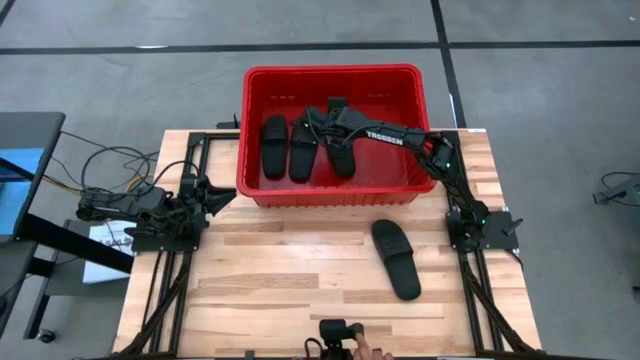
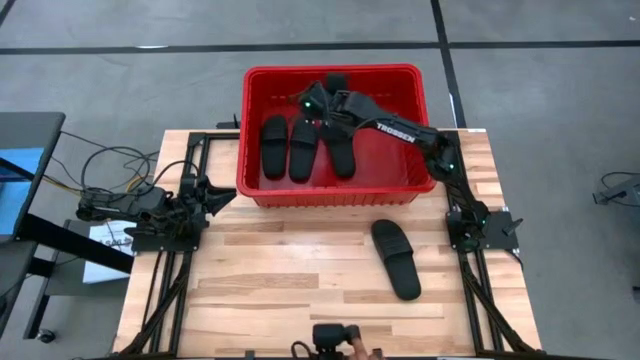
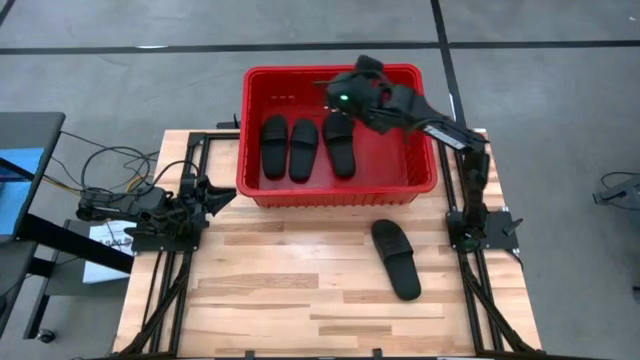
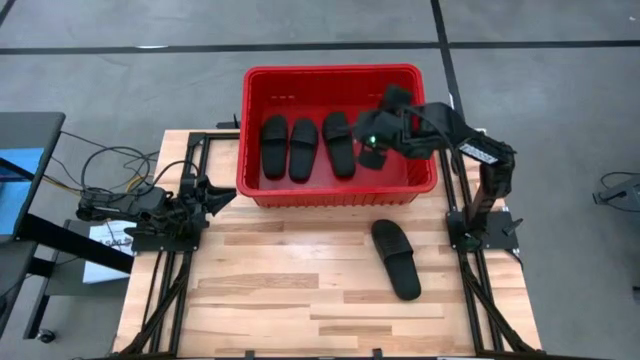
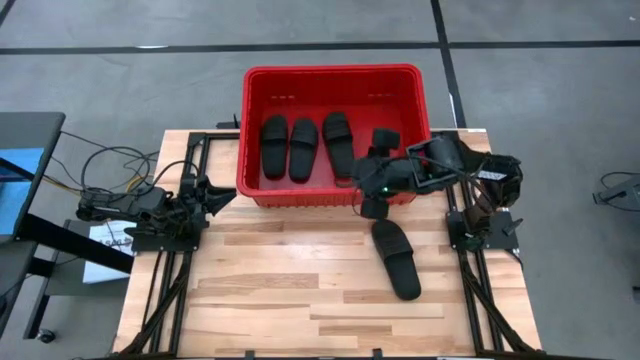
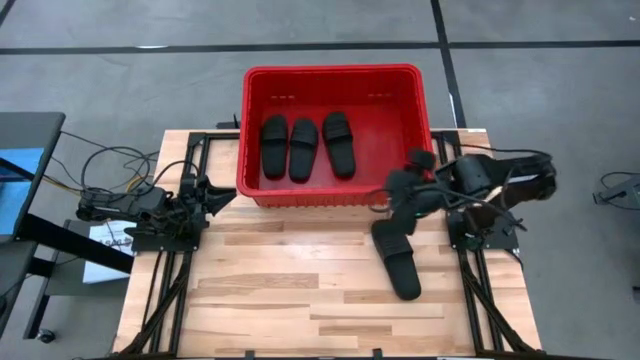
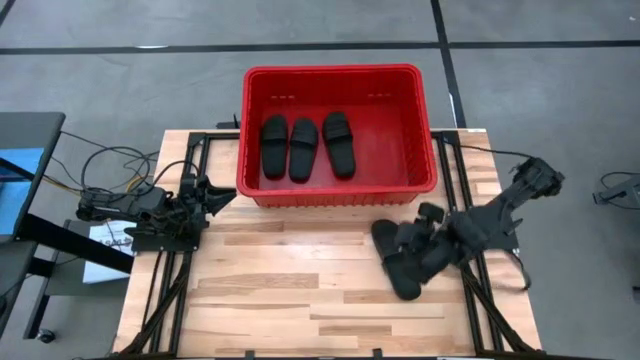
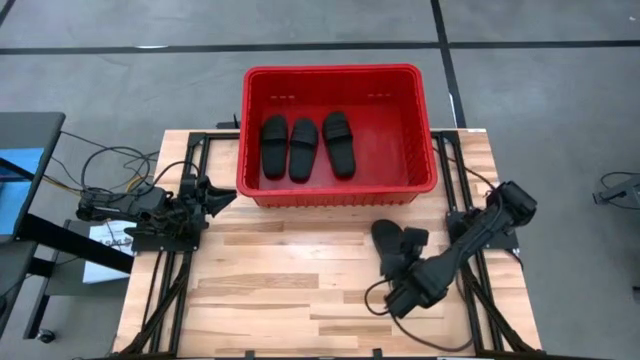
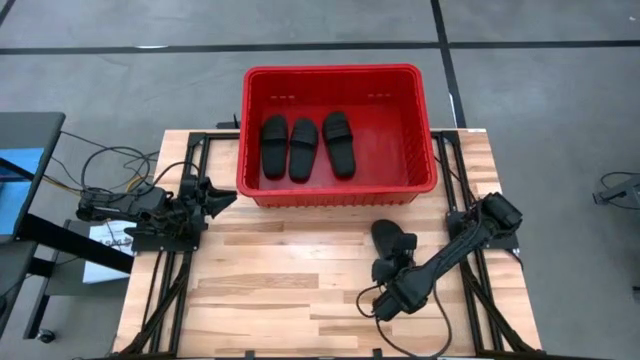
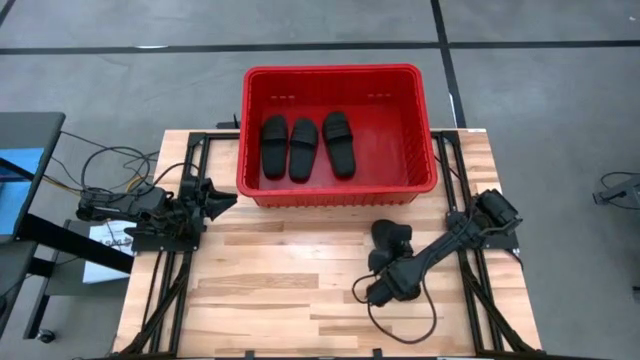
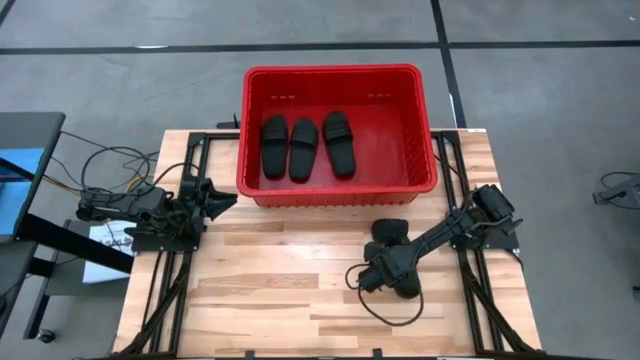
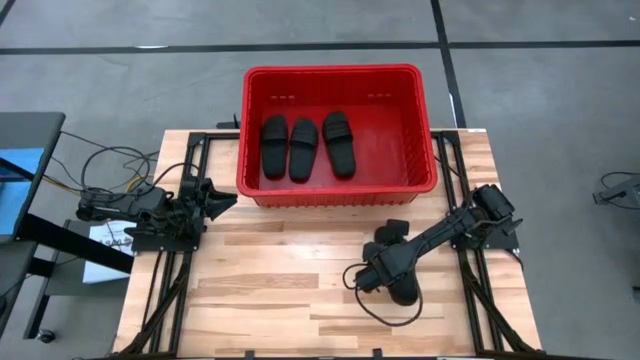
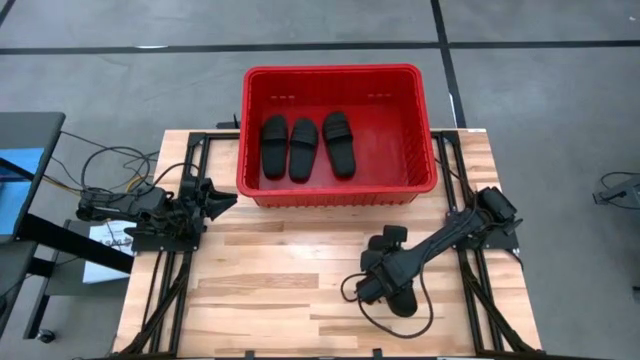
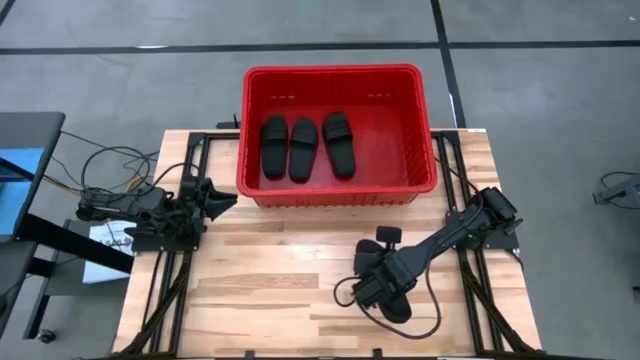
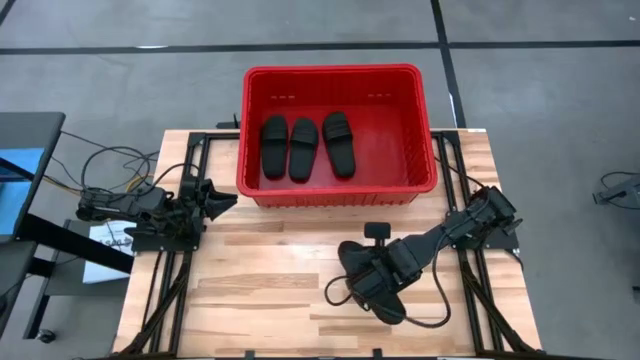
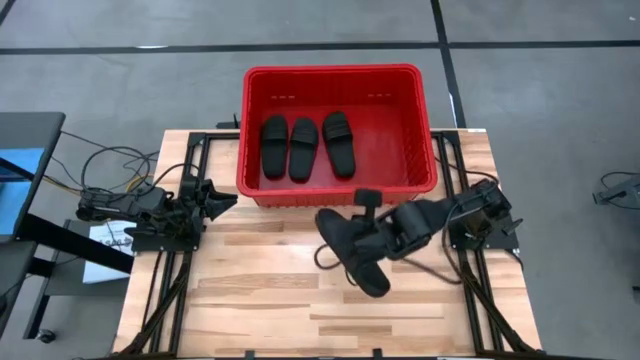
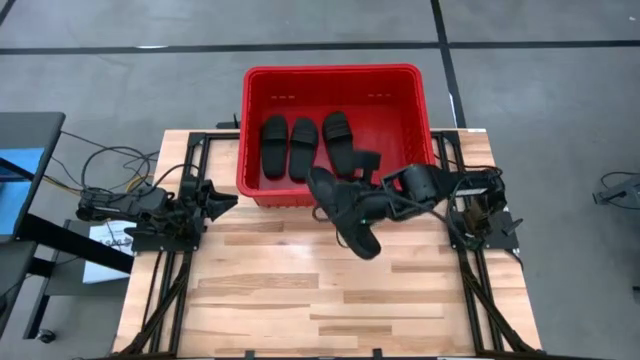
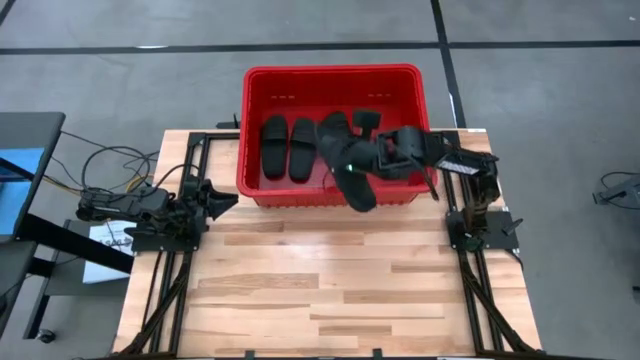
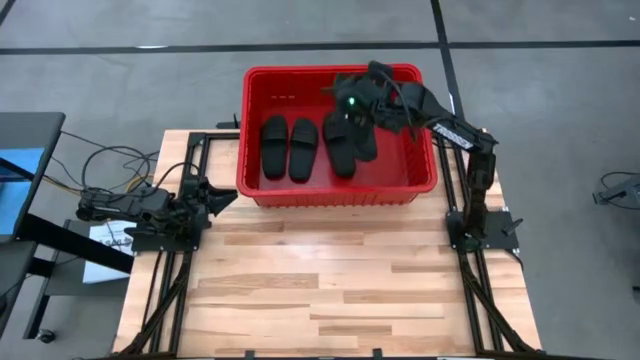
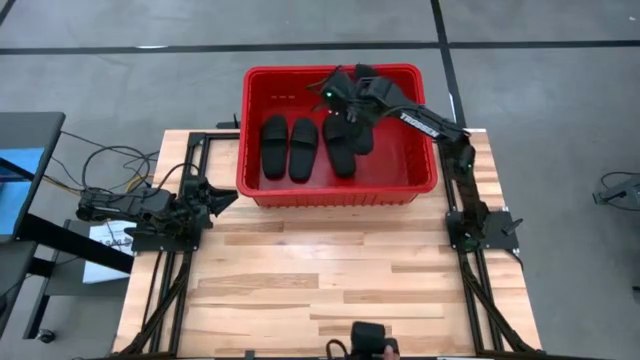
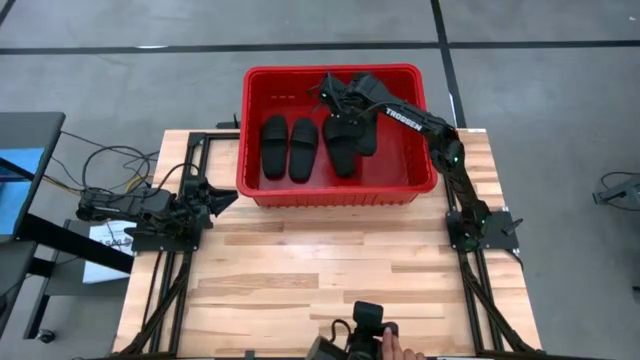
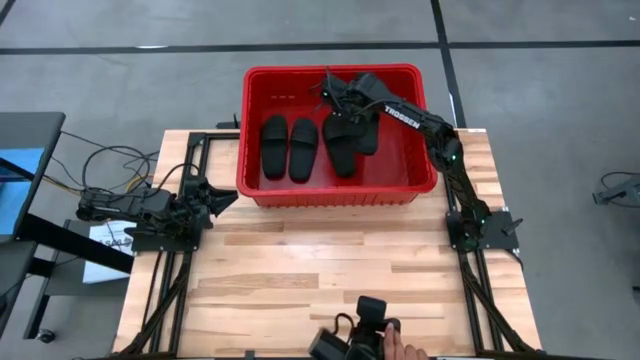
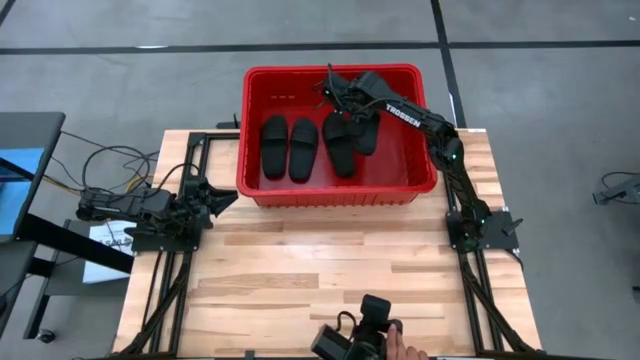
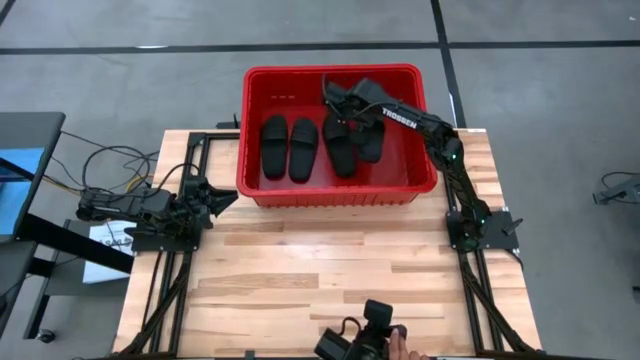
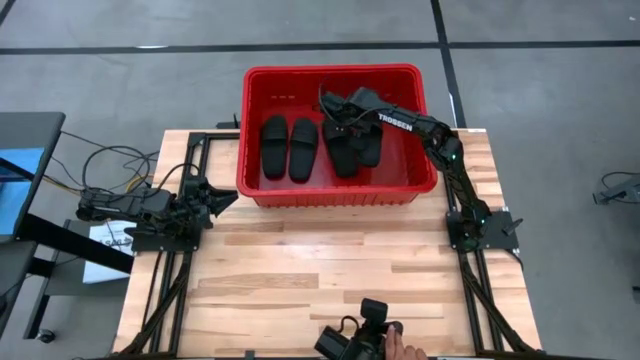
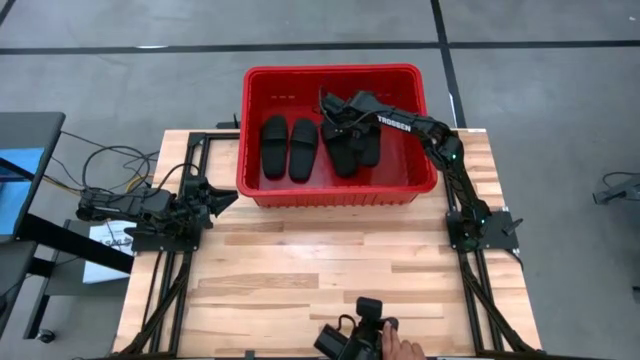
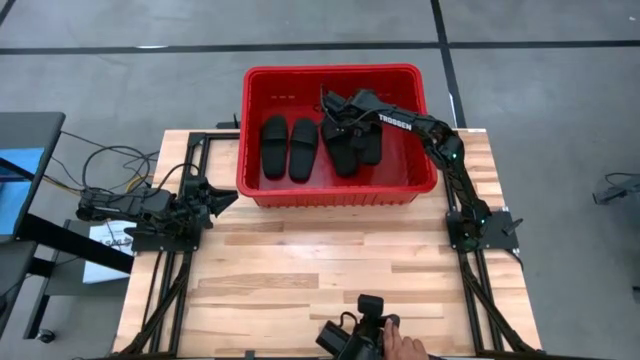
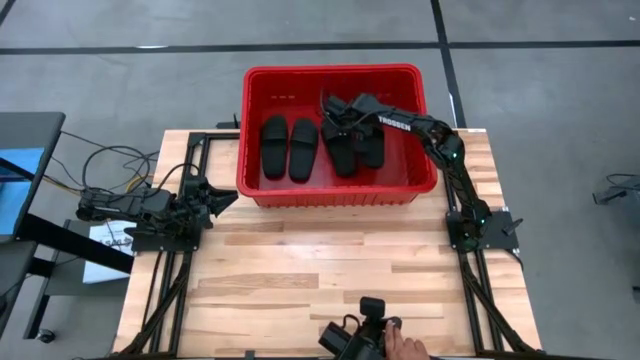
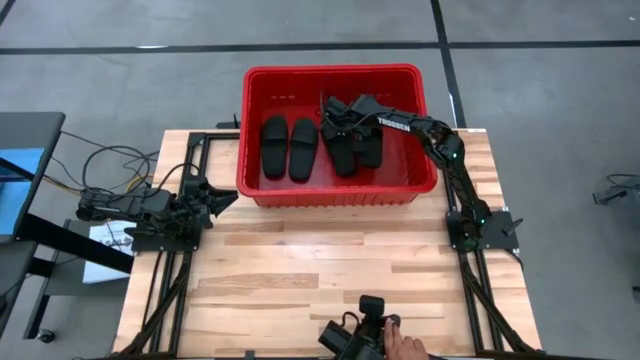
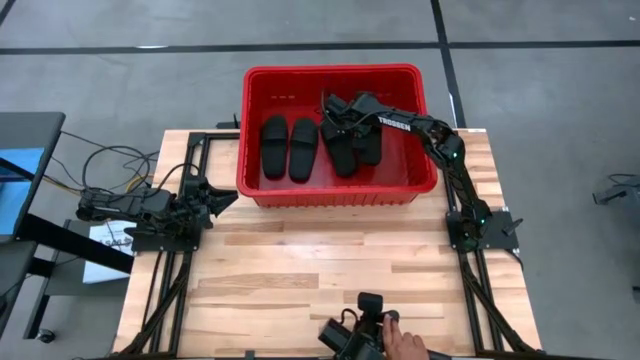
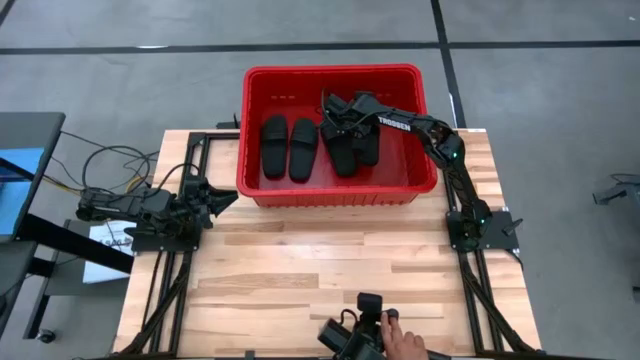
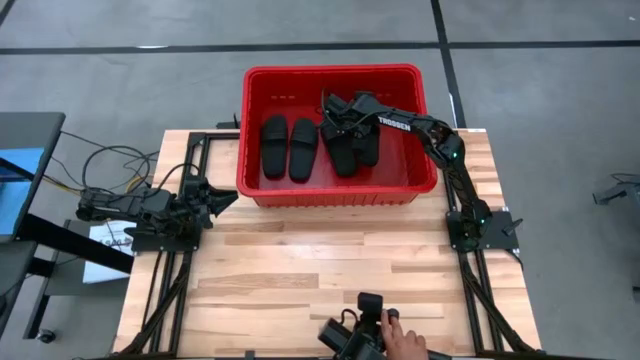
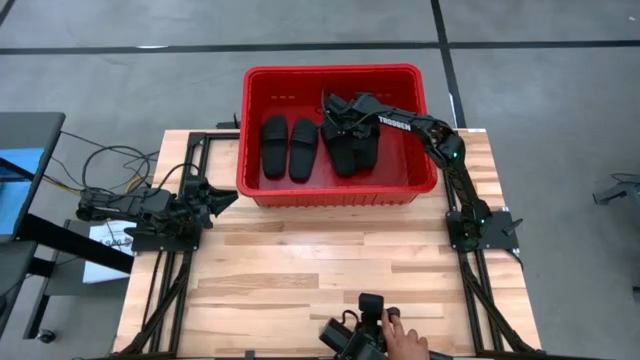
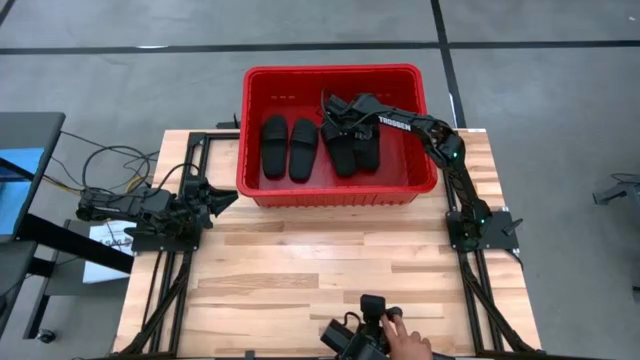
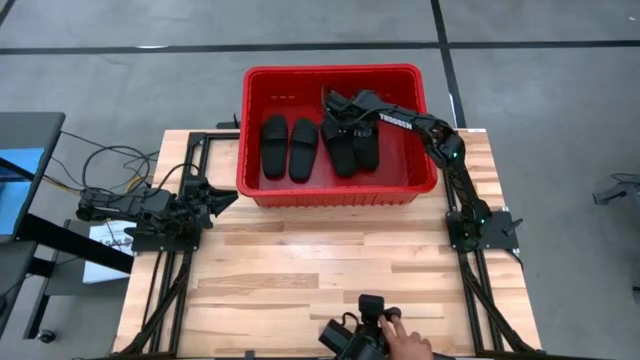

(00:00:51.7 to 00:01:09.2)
Task: Pick and place slides into bin
Put the black slipper into the red bin
